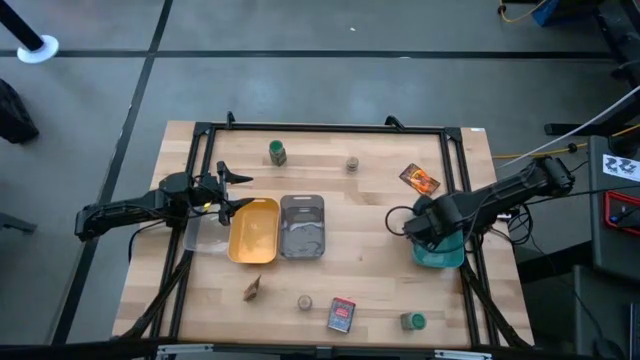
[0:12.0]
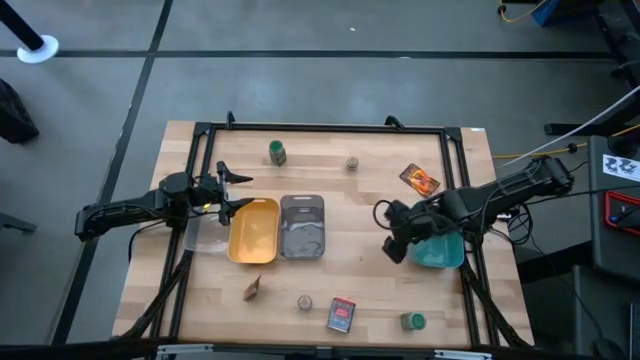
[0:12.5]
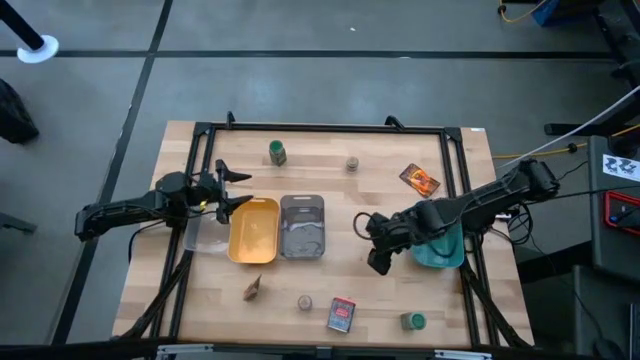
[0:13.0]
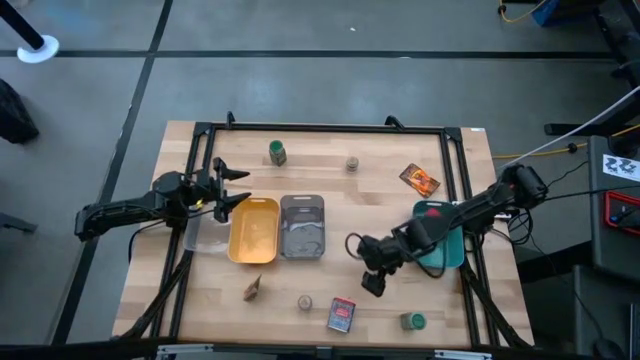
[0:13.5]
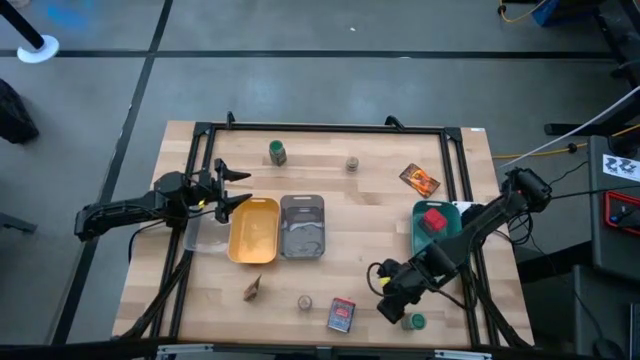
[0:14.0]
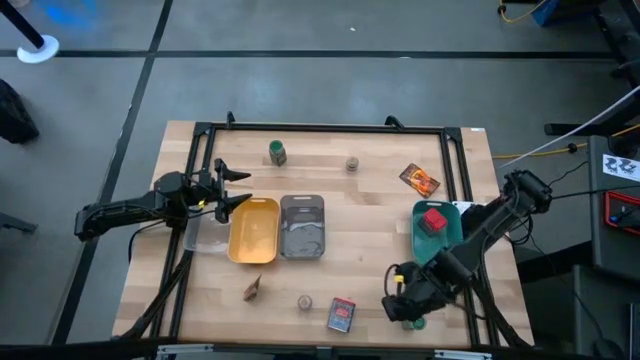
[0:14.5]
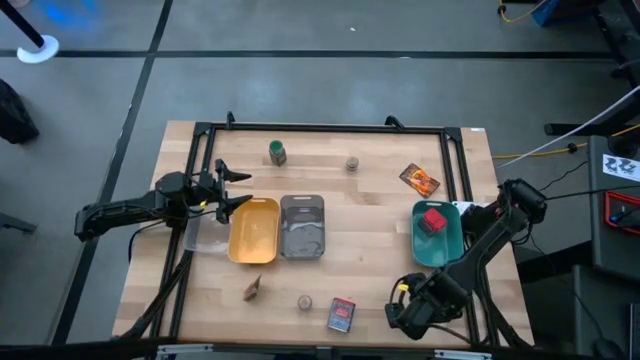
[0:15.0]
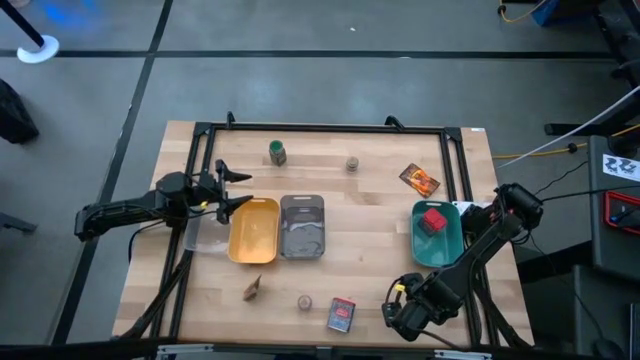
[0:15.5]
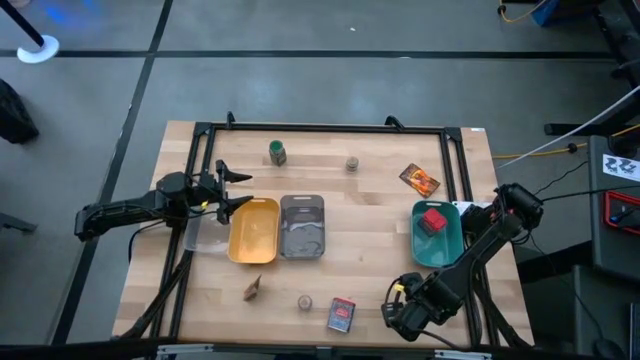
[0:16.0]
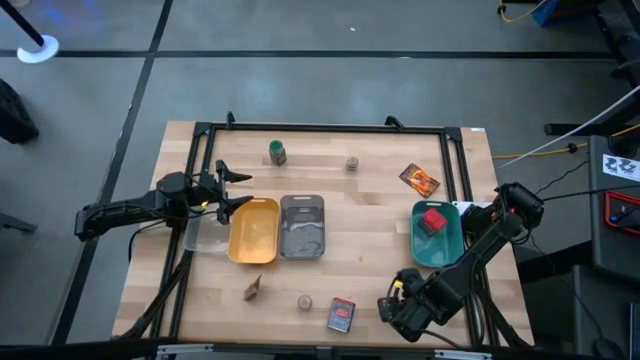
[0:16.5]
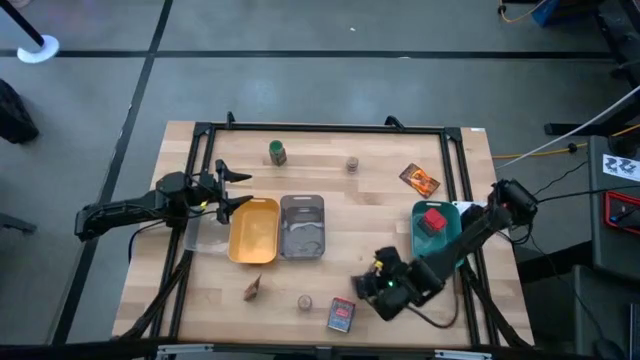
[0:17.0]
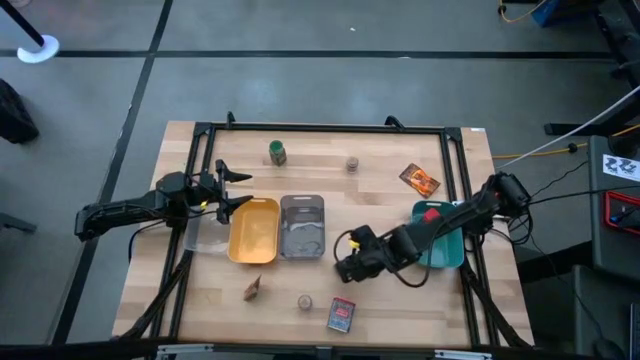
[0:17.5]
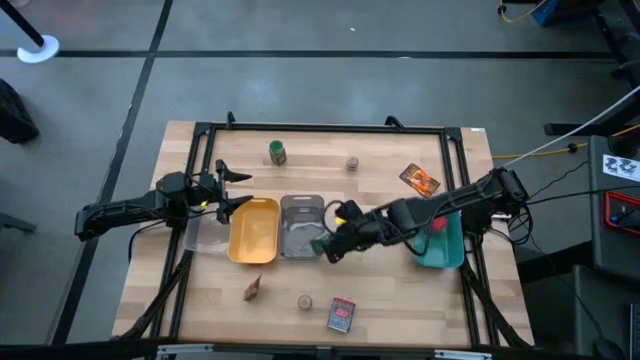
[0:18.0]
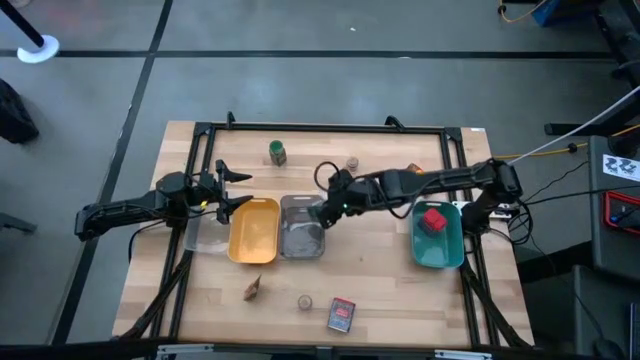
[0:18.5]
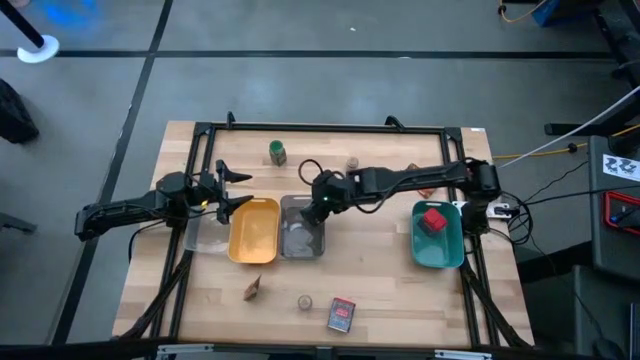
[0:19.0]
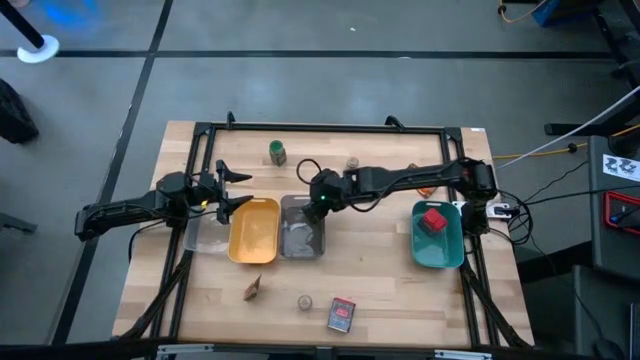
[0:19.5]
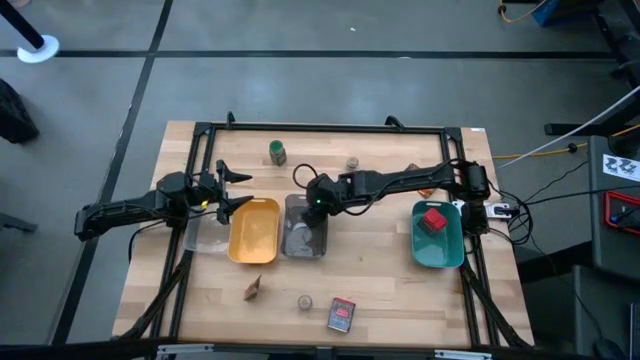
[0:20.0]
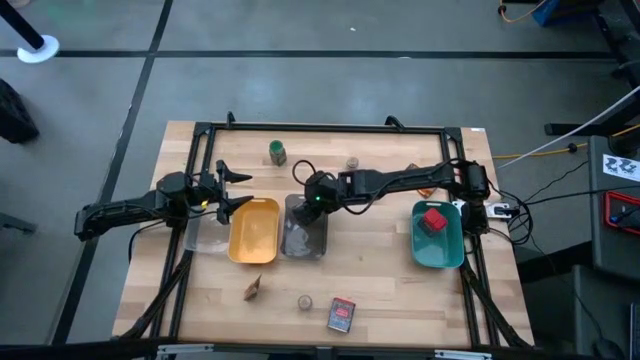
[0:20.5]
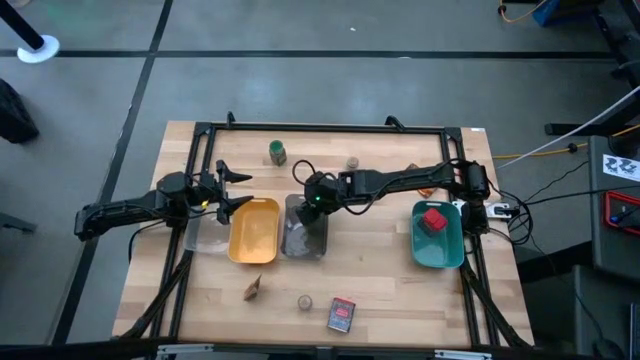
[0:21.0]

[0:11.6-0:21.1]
Task: Sort spices by type
Put the bottom green spice bottle into the black bin

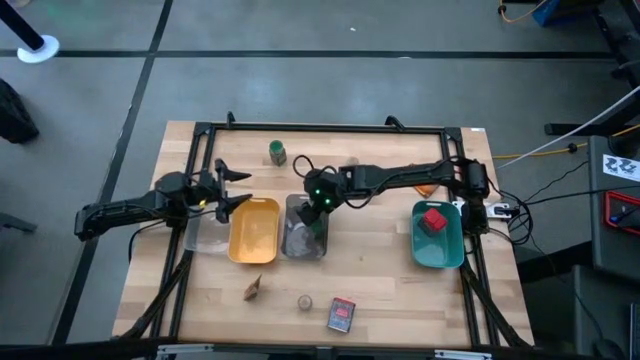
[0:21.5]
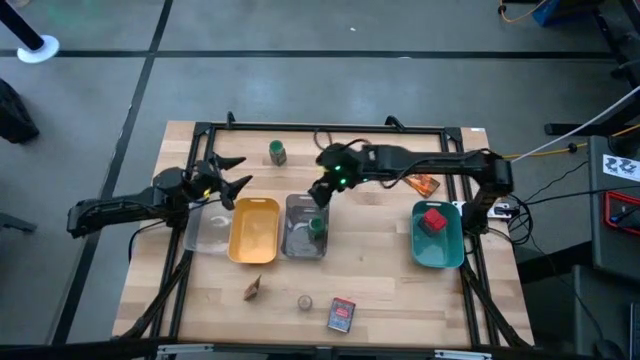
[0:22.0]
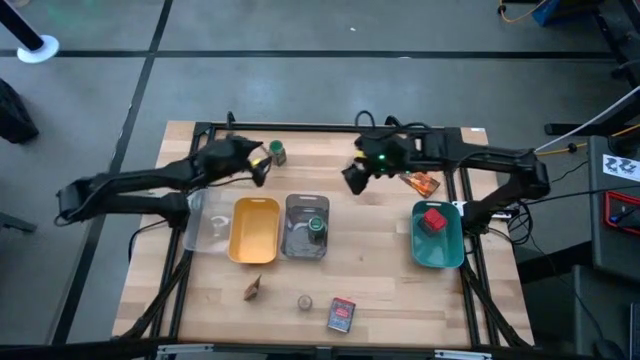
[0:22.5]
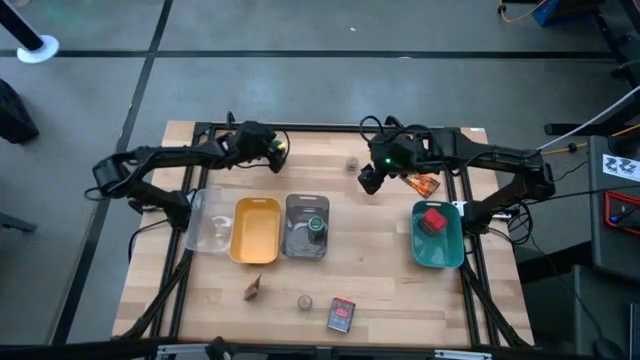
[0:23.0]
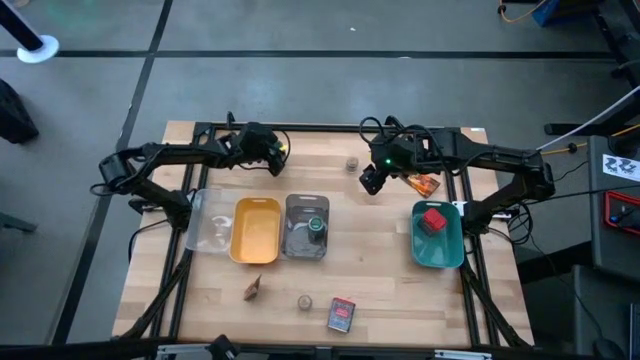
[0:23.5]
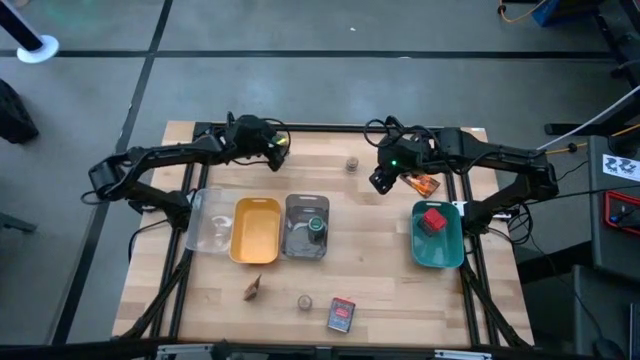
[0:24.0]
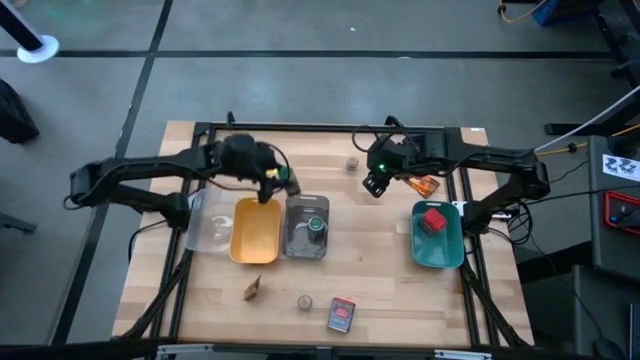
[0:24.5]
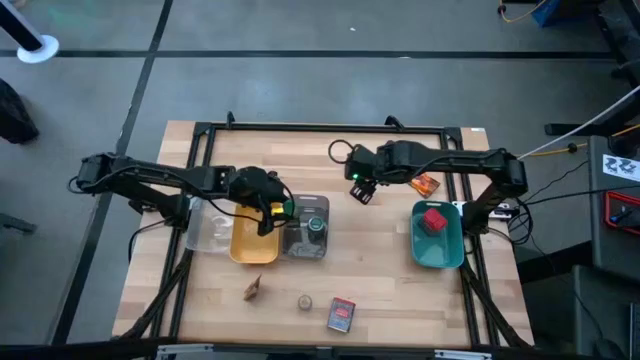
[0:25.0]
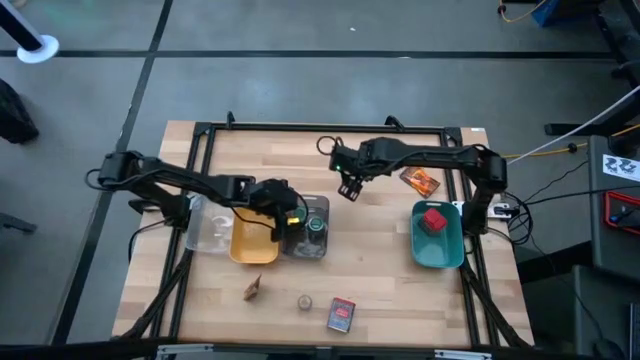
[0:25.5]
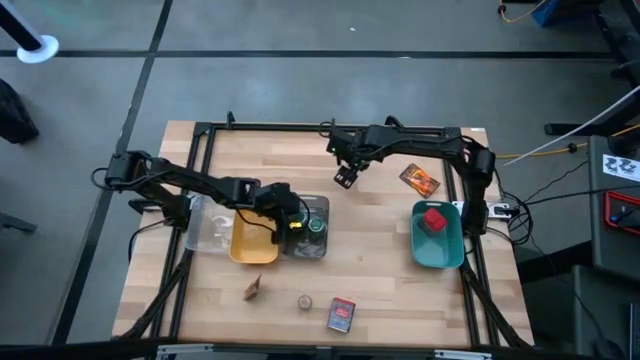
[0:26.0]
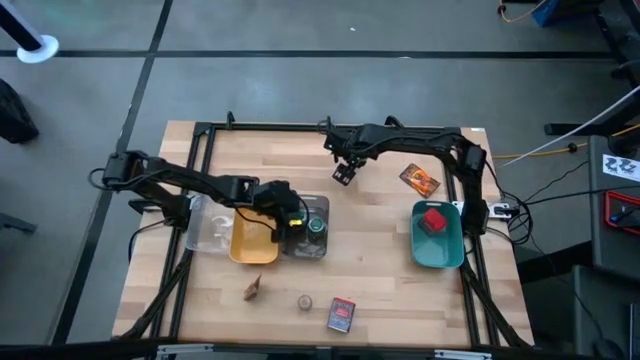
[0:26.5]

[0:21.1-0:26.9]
Put the green spice bottle into the black bin

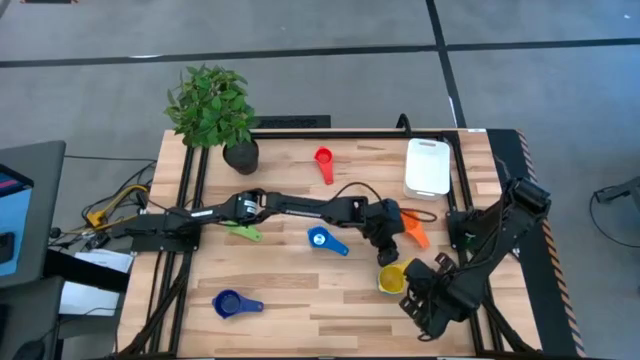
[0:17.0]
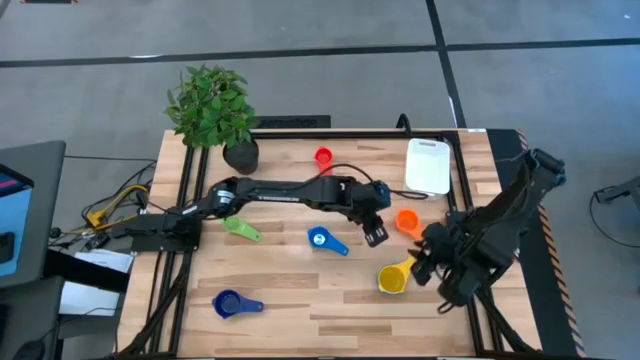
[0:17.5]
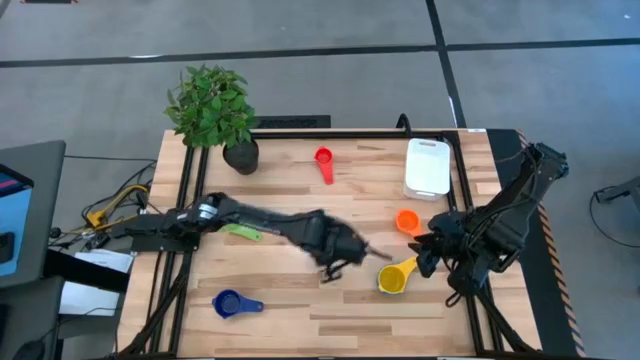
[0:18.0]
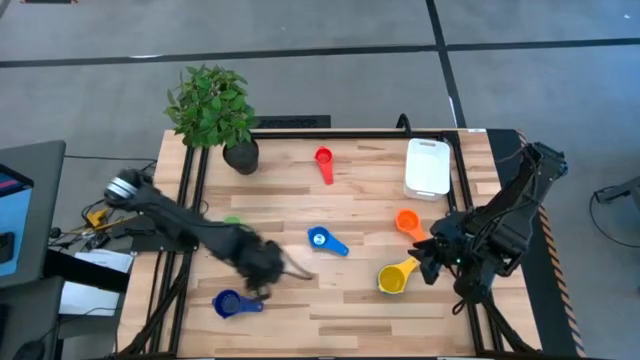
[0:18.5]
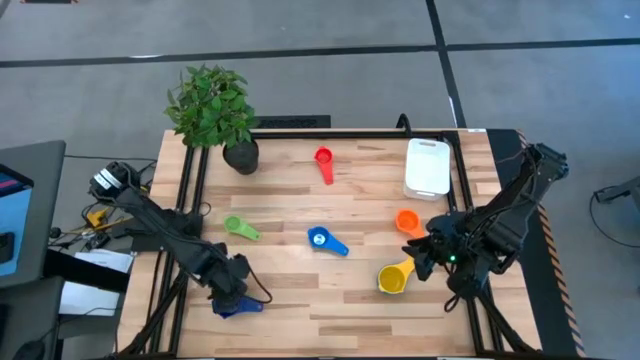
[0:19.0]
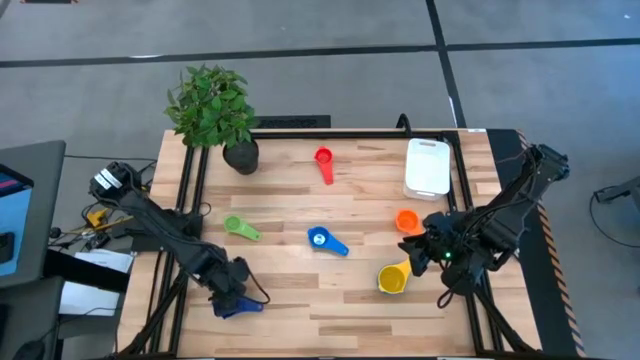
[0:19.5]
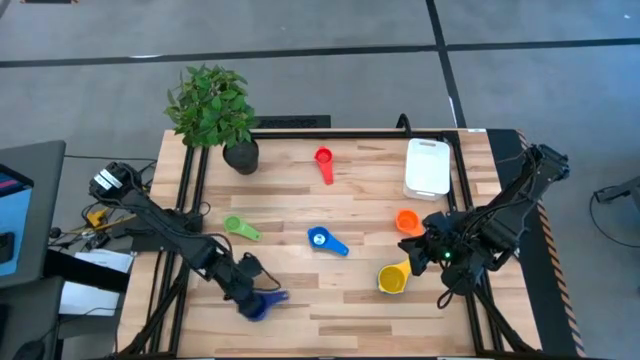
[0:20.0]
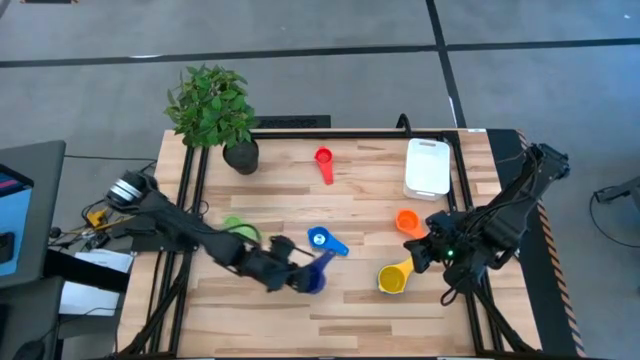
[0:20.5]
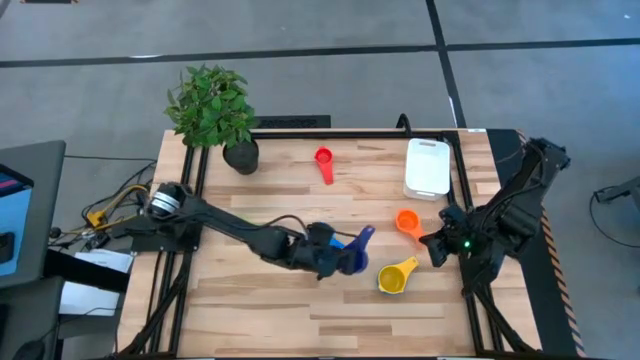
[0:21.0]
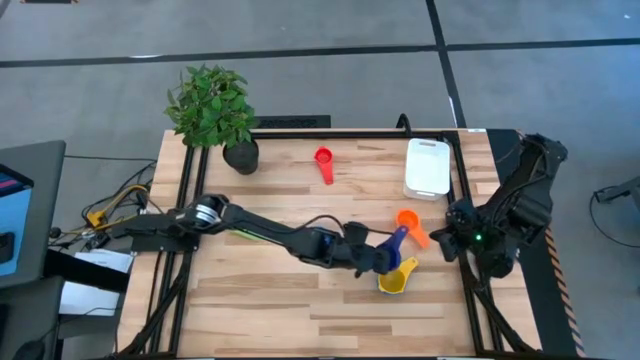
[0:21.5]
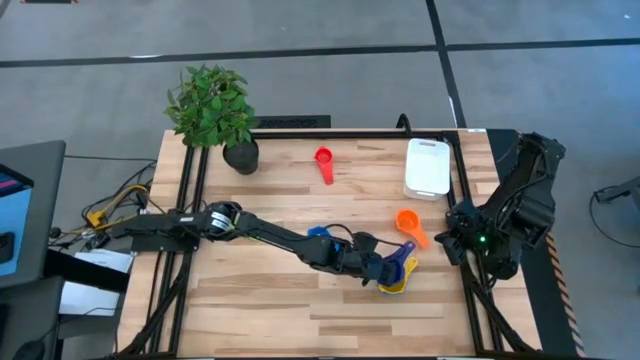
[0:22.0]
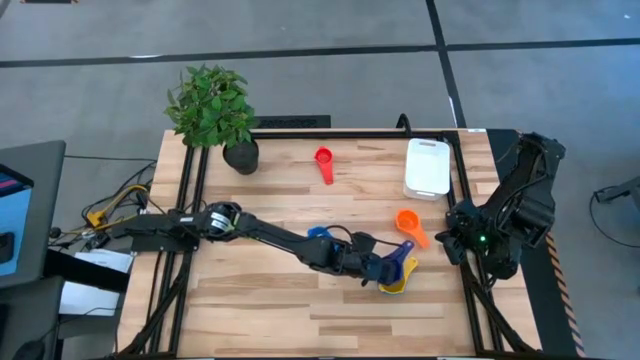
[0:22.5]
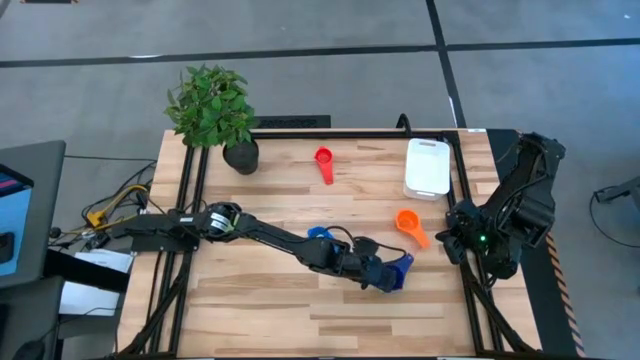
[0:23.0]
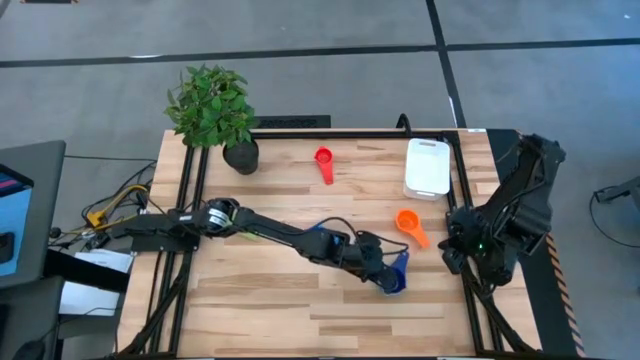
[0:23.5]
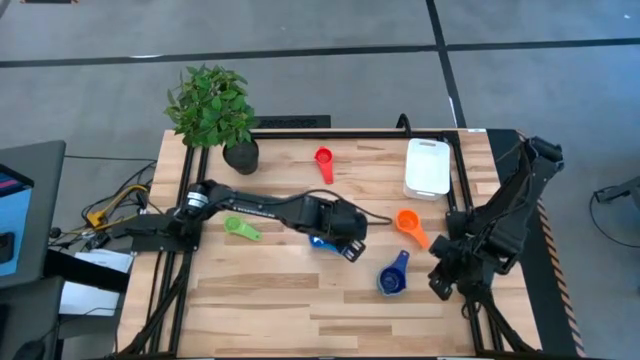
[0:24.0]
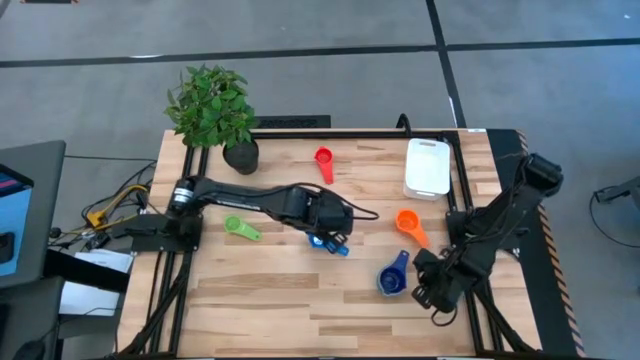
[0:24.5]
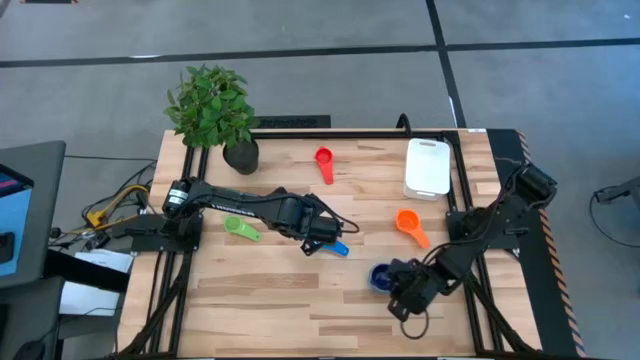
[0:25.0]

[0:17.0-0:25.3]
Task: Nest measuring cups in basket
Stack the dark blue measuring cup on the yellow measuring cup
